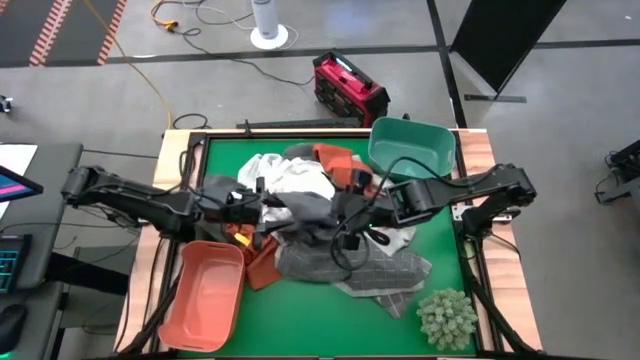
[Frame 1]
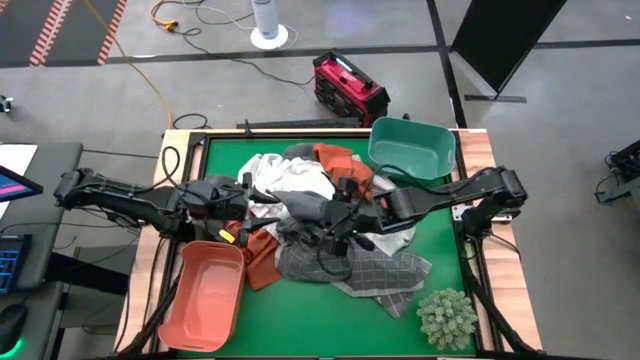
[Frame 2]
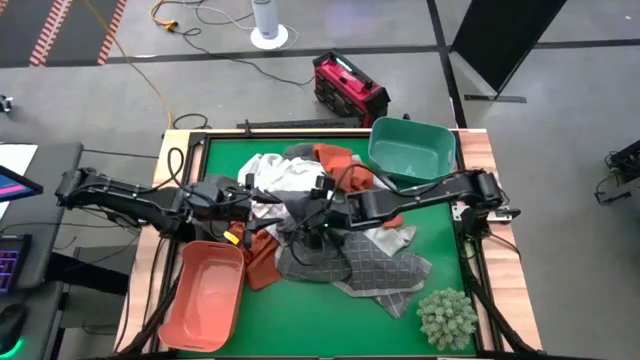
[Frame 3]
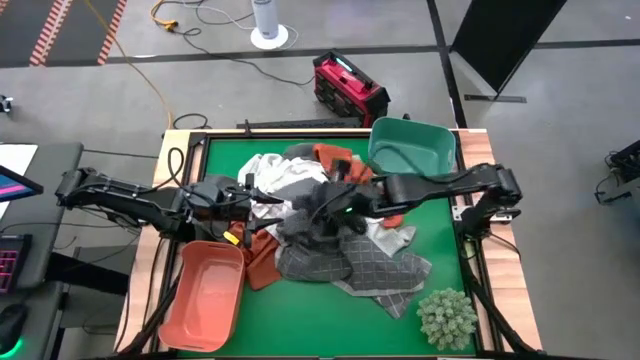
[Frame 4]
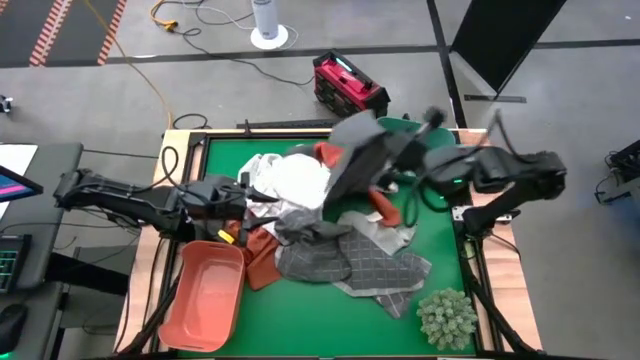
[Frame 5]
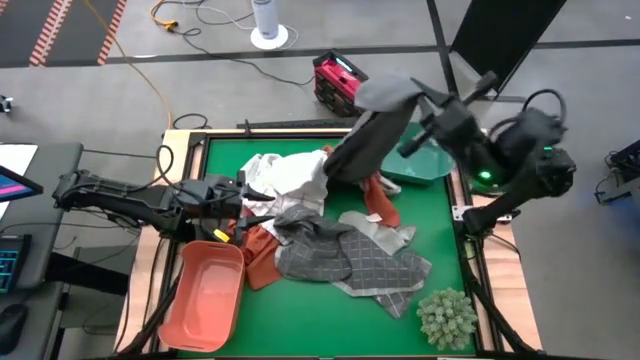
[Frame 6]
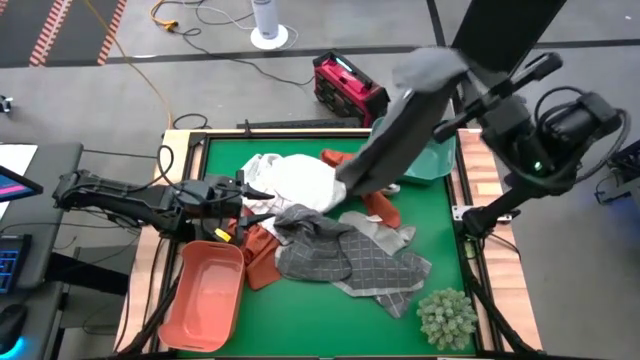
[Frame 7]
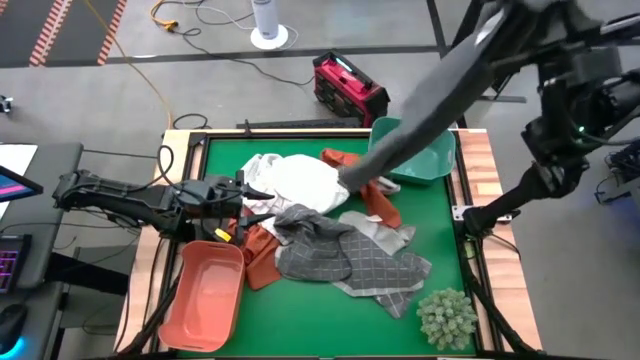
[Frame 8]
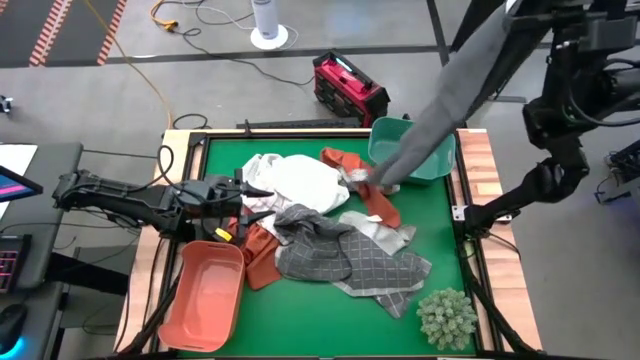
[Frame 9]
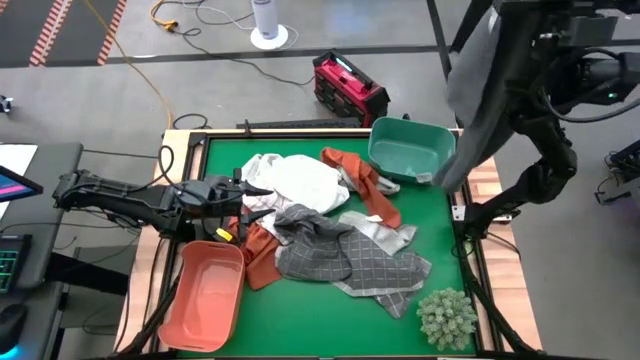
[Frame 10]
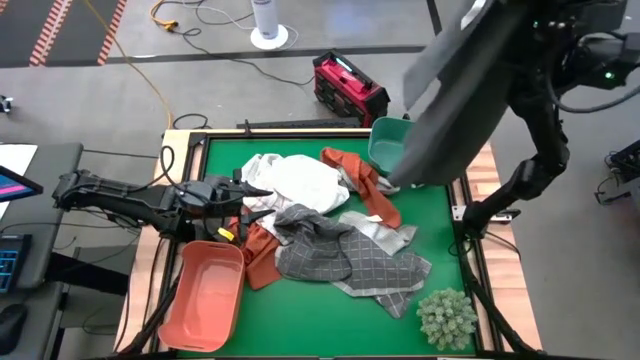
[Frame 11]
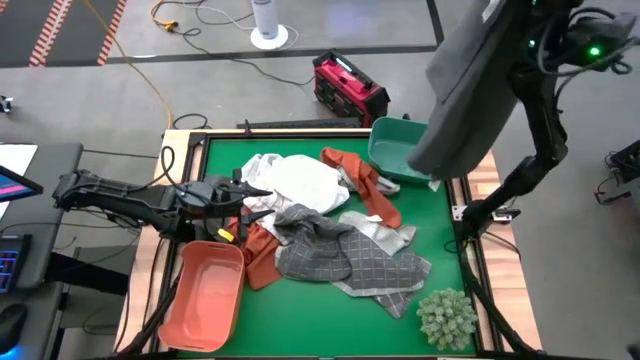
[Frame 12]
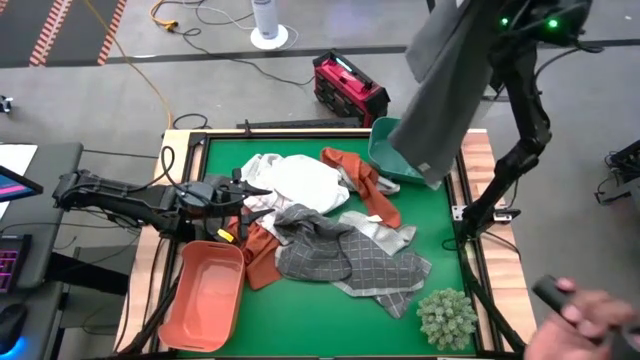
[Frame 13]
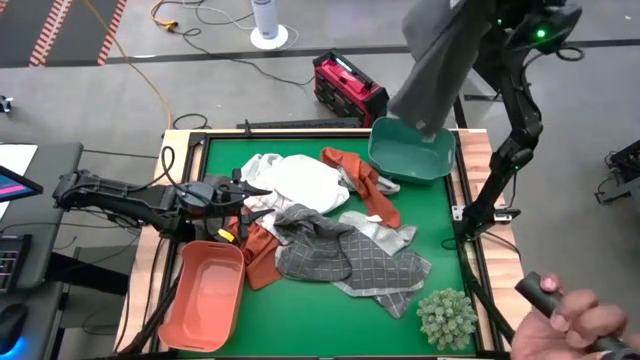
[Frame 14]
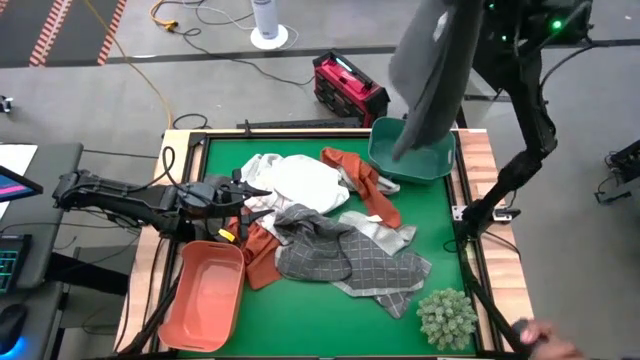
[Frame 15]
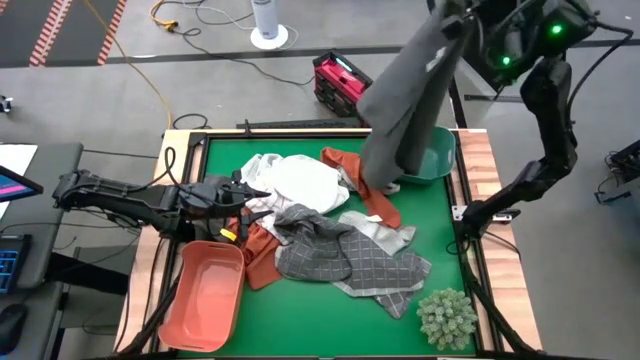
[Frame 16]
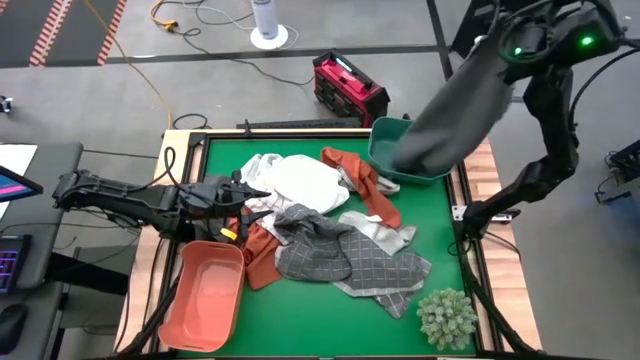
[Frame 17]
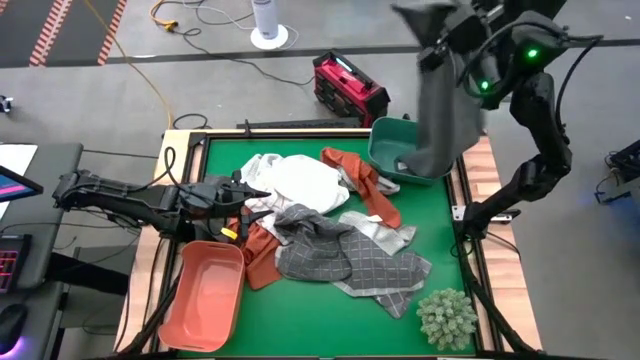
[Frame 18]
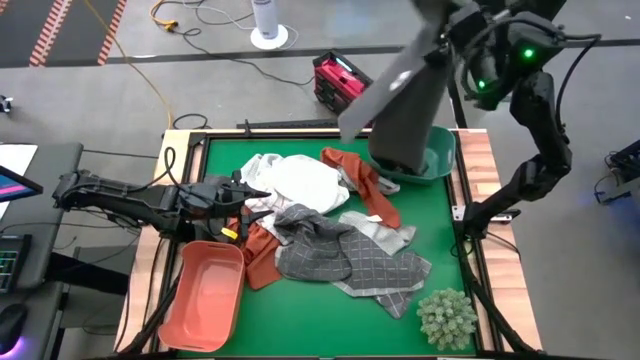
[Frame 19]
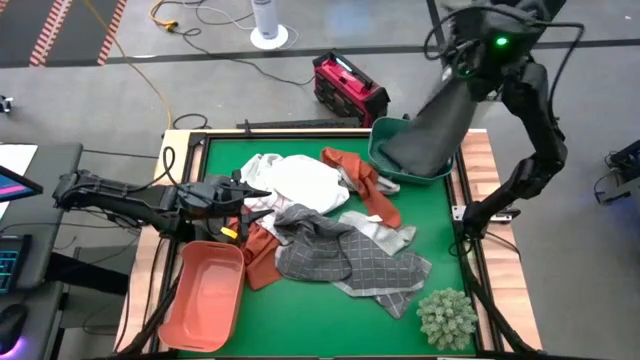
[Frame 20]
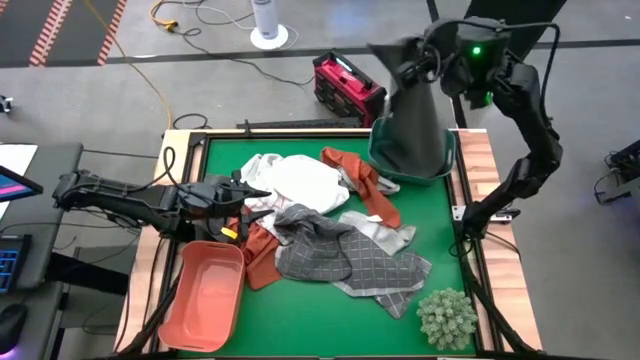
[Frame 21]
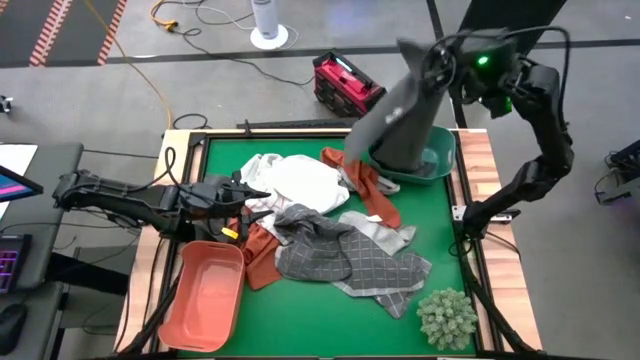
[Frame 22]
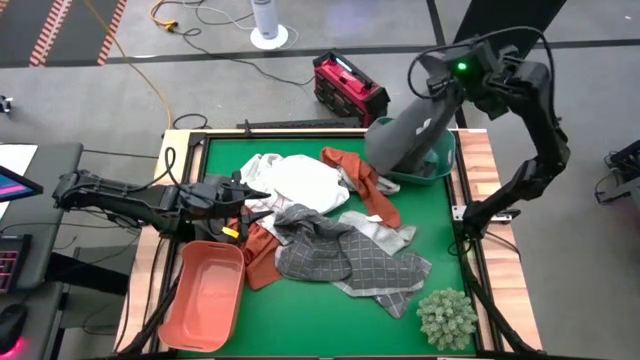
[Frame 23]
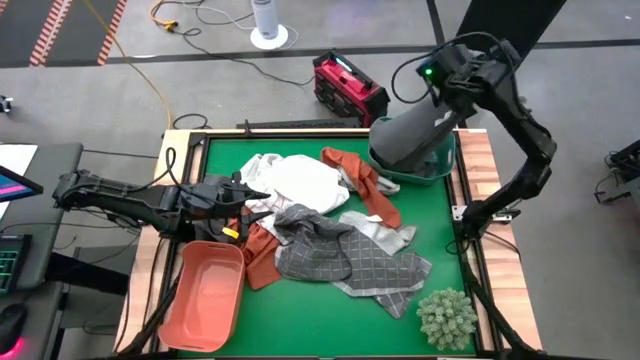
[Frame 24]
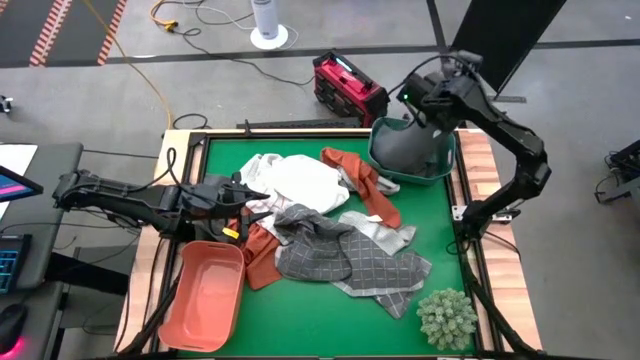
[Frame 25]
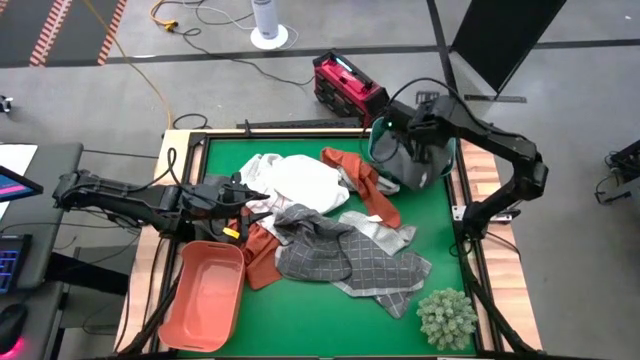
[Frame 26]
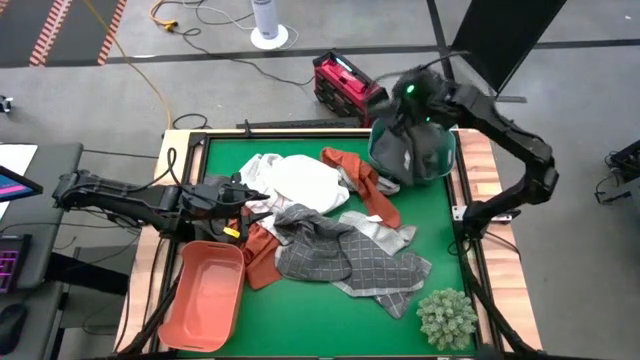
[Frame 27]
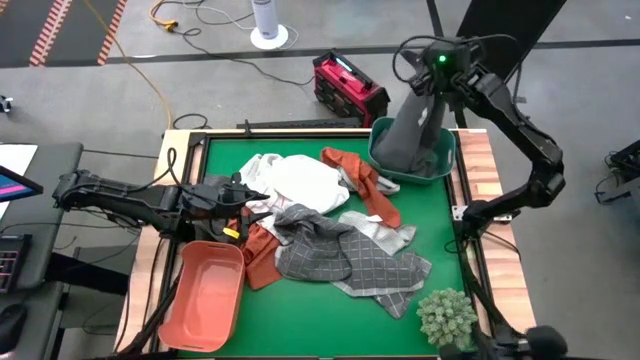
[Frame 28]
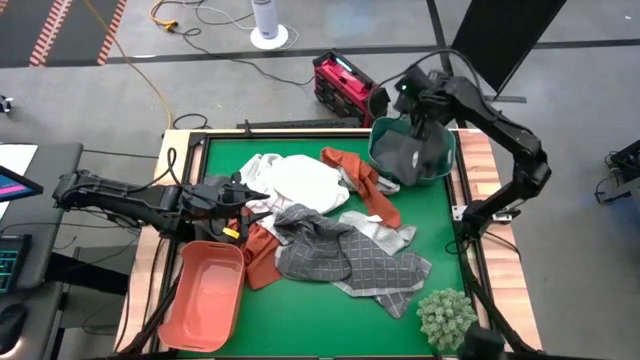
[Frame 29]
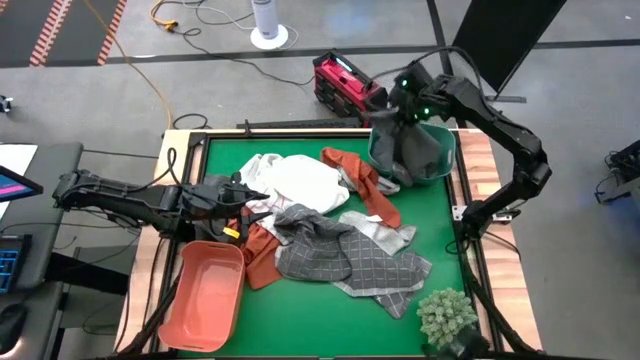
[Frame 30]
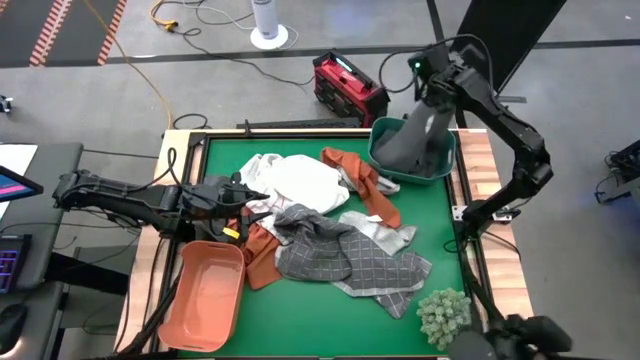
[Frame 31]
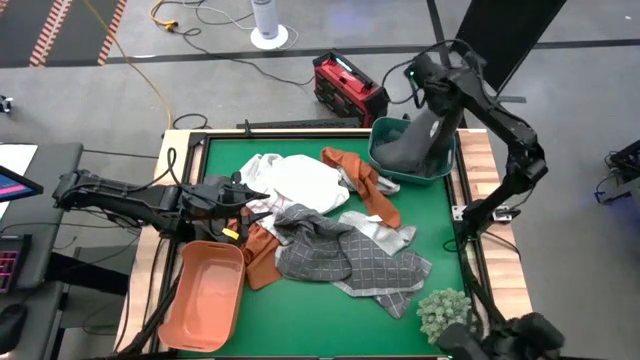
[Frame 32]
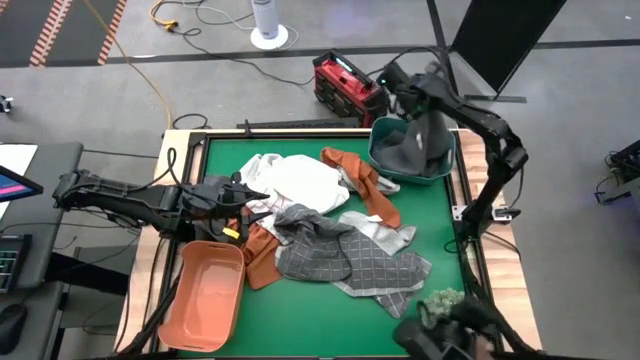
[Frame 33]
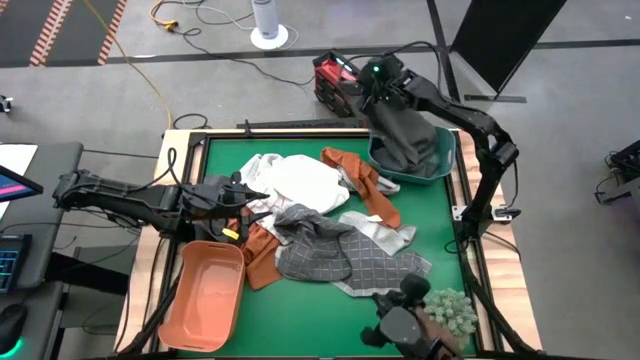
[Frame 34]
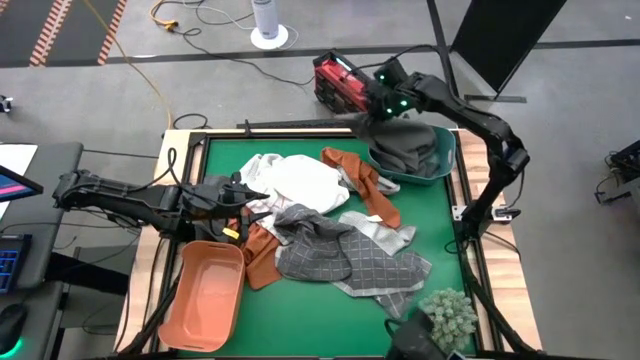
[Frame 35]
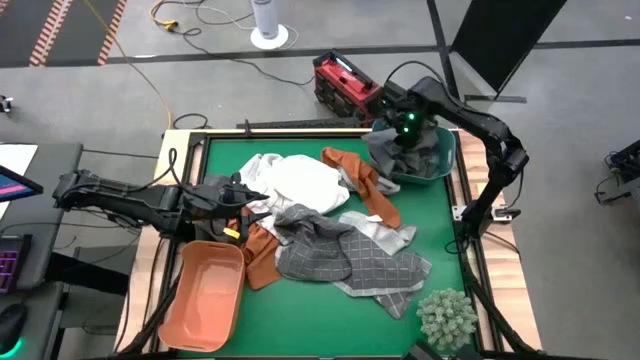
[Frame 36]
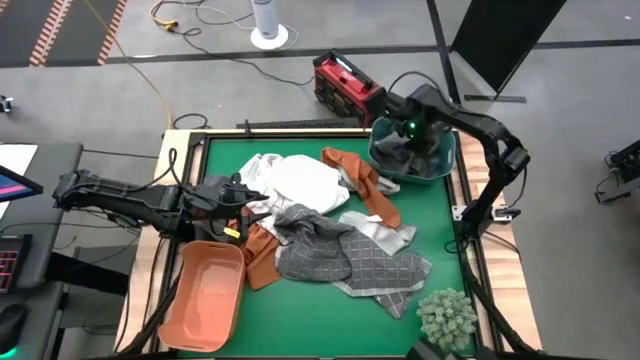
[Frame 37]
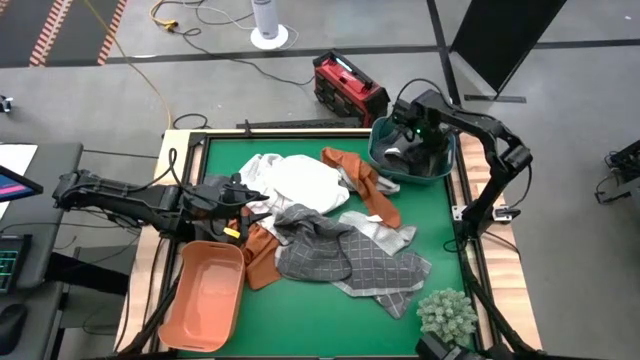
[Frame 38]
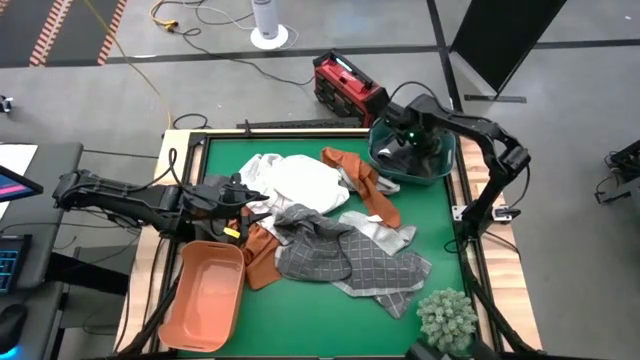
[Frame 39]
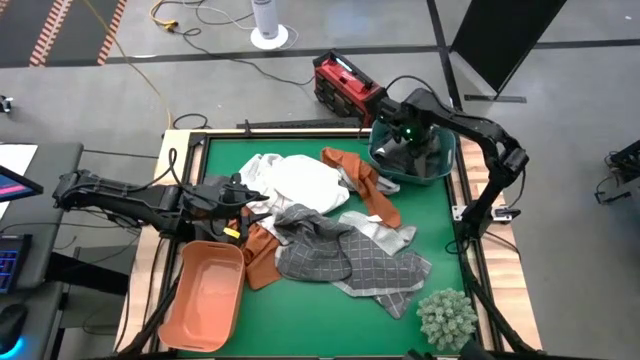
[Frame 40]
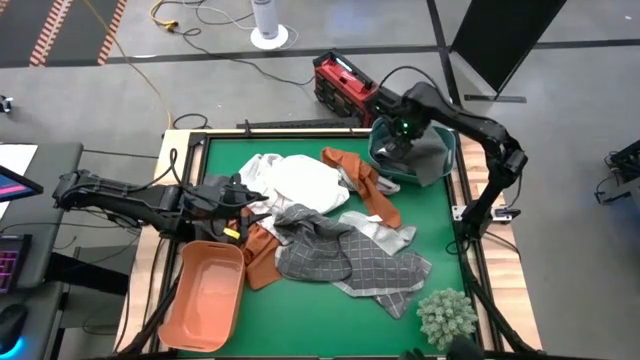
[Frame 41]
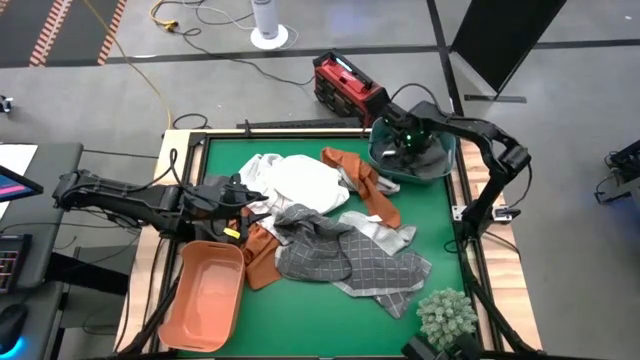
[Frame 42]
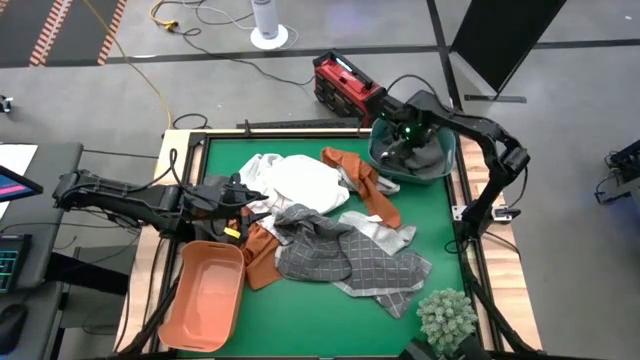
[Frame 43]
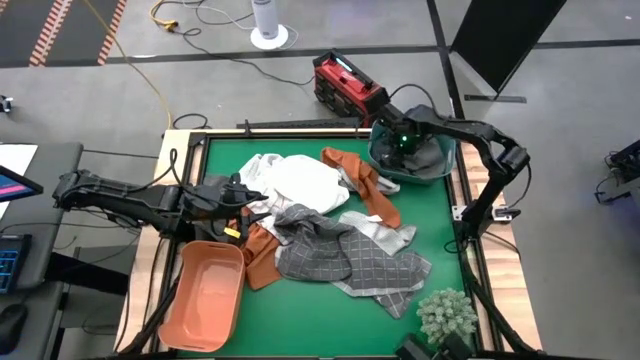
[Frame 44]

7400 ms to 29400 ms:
Task: Sort towels by color in basket
Put the right gray towel into the green bin
